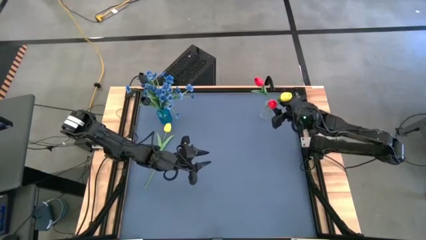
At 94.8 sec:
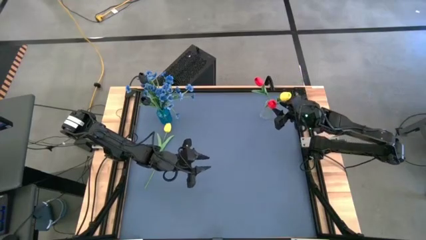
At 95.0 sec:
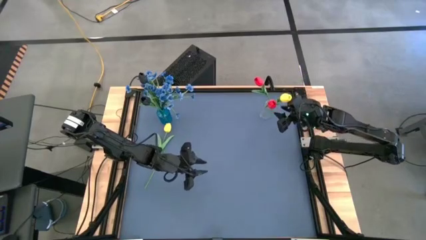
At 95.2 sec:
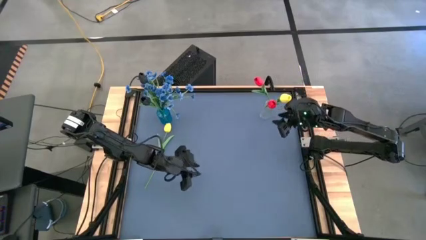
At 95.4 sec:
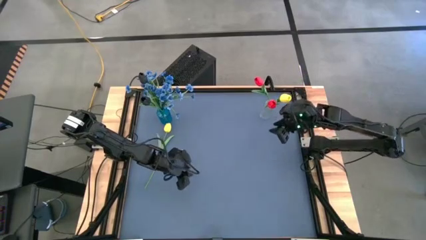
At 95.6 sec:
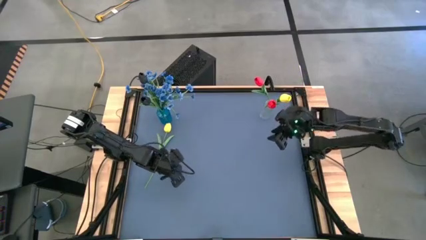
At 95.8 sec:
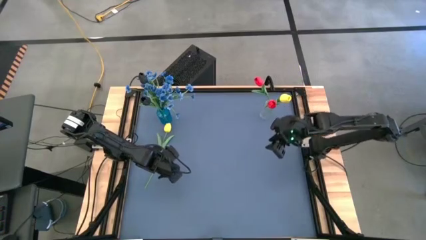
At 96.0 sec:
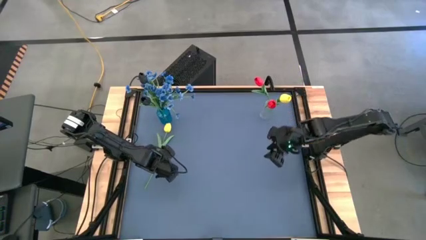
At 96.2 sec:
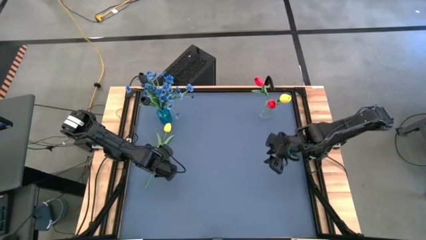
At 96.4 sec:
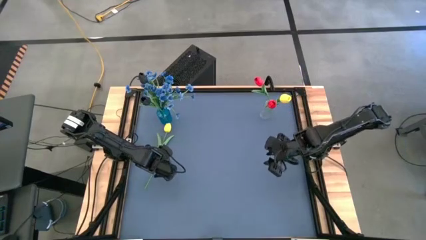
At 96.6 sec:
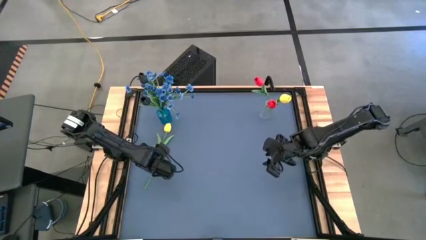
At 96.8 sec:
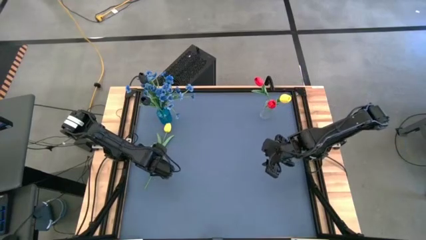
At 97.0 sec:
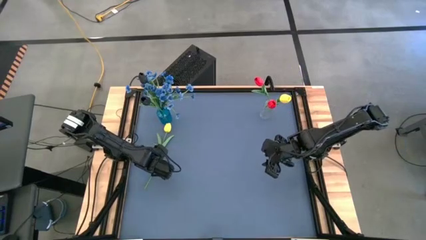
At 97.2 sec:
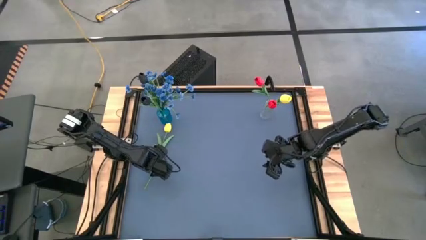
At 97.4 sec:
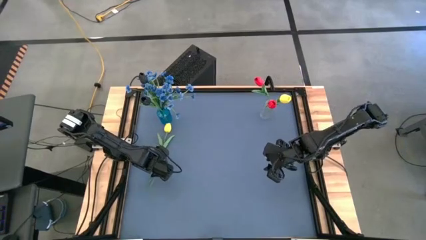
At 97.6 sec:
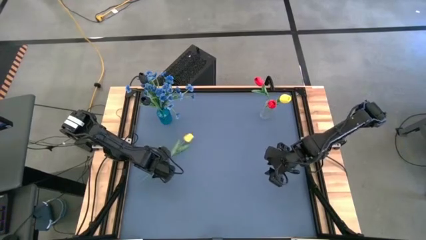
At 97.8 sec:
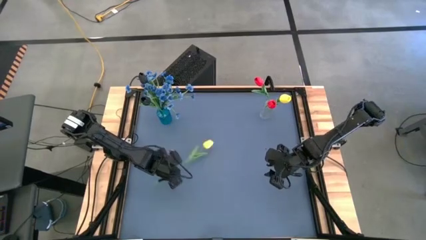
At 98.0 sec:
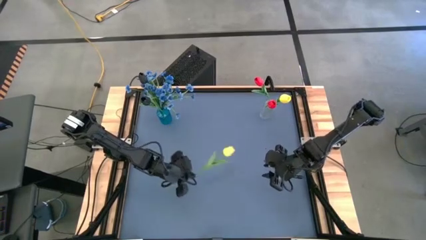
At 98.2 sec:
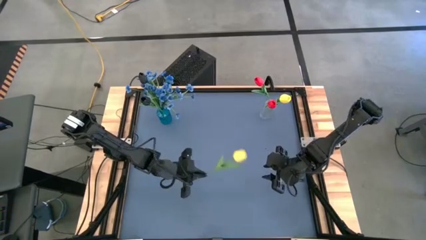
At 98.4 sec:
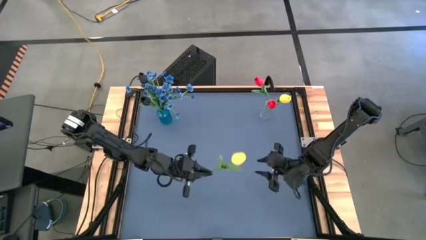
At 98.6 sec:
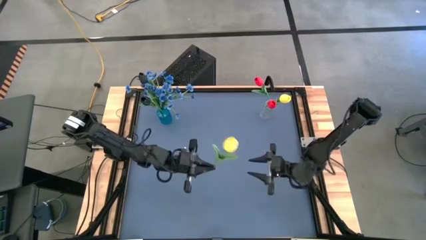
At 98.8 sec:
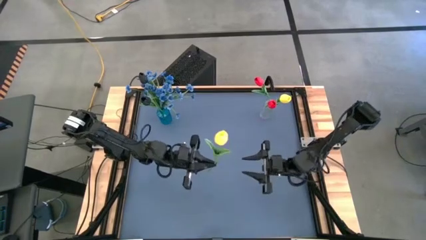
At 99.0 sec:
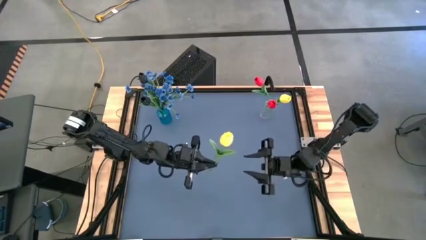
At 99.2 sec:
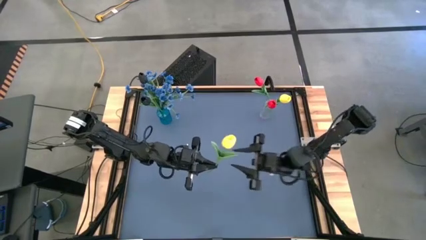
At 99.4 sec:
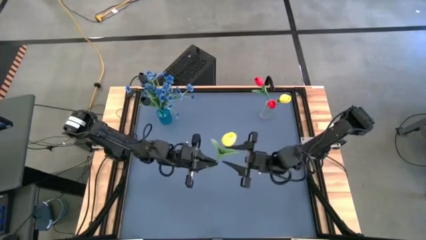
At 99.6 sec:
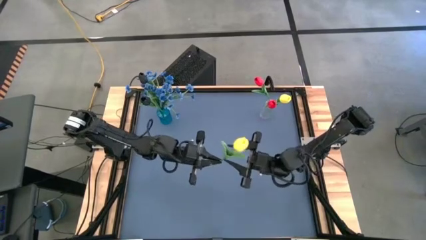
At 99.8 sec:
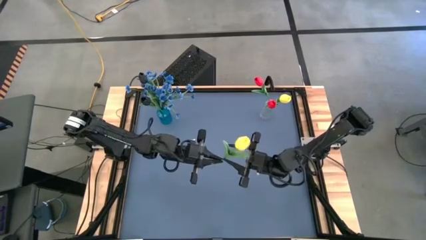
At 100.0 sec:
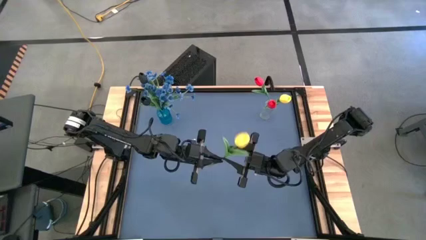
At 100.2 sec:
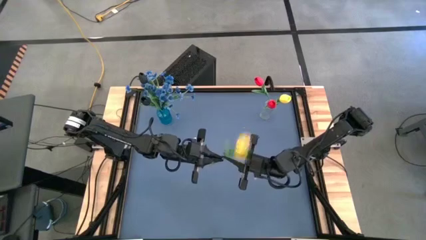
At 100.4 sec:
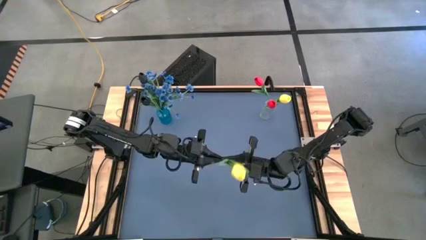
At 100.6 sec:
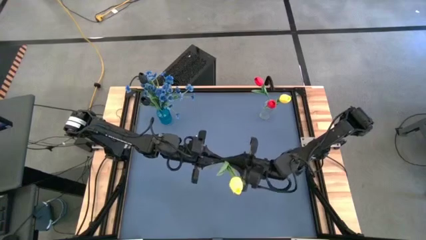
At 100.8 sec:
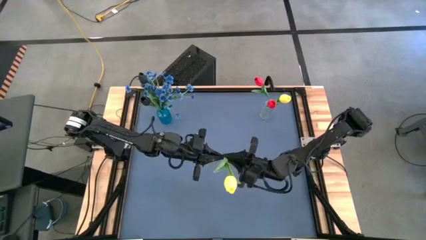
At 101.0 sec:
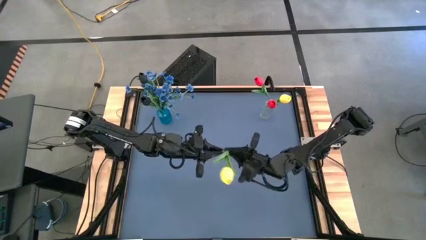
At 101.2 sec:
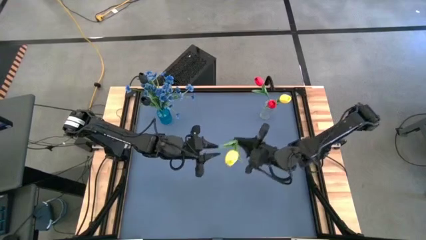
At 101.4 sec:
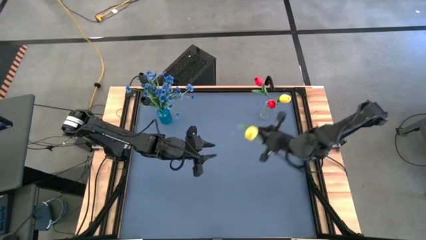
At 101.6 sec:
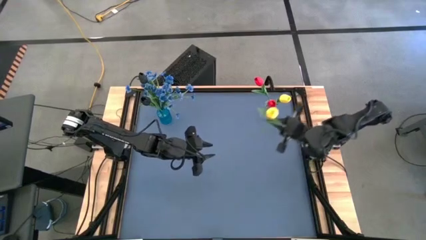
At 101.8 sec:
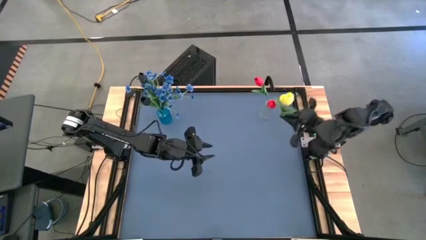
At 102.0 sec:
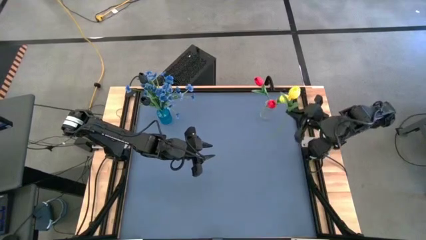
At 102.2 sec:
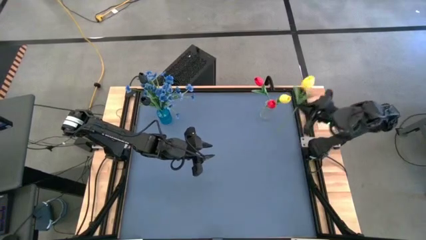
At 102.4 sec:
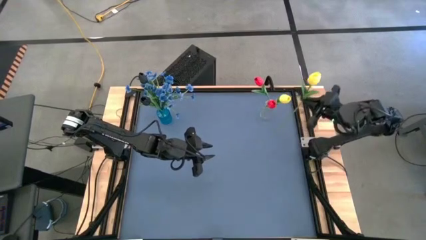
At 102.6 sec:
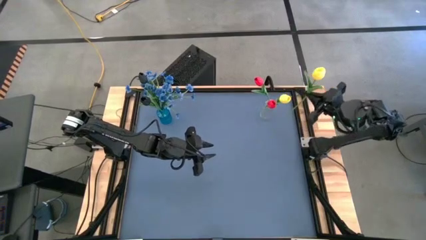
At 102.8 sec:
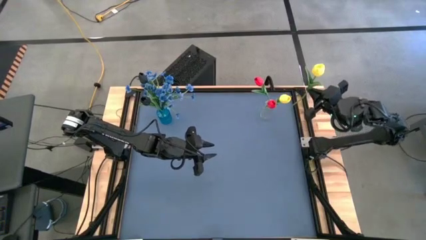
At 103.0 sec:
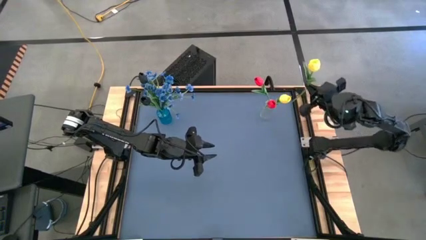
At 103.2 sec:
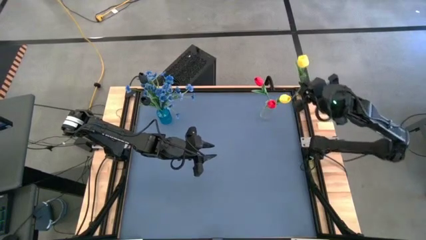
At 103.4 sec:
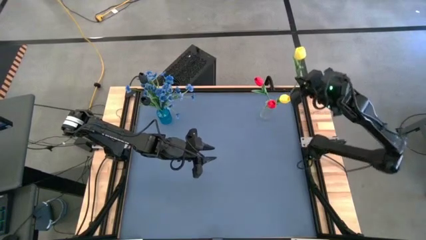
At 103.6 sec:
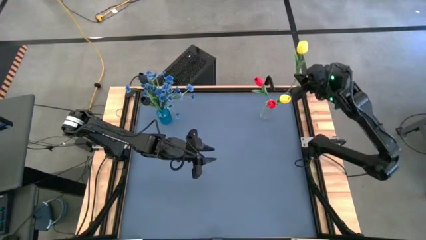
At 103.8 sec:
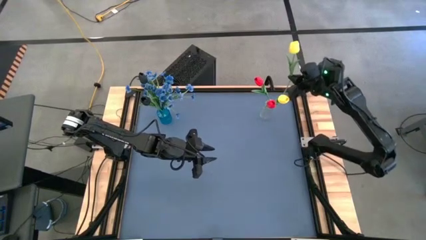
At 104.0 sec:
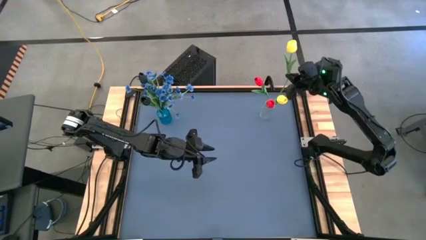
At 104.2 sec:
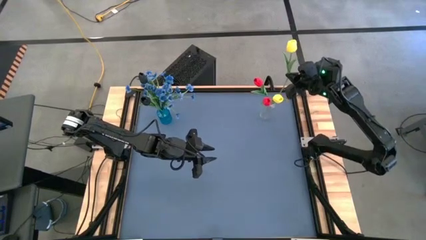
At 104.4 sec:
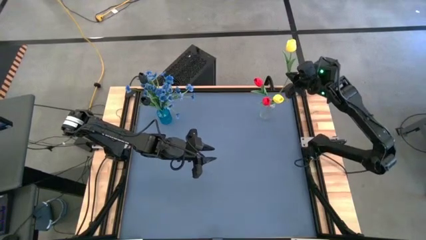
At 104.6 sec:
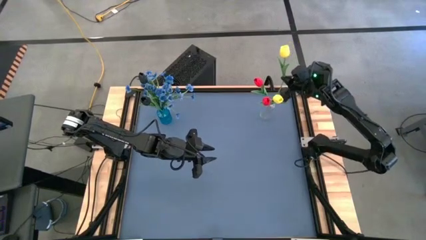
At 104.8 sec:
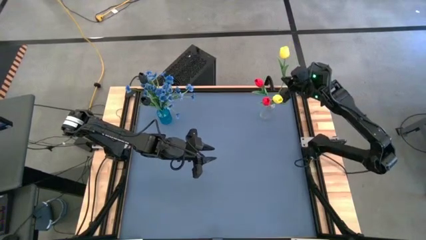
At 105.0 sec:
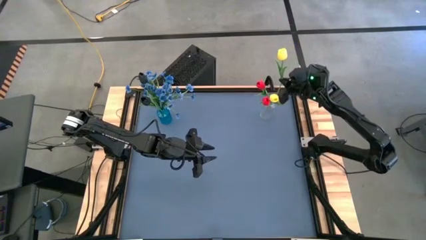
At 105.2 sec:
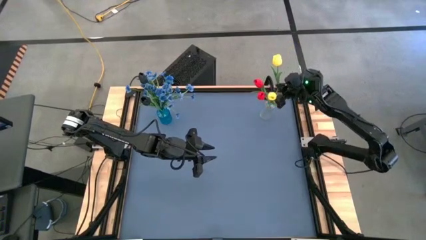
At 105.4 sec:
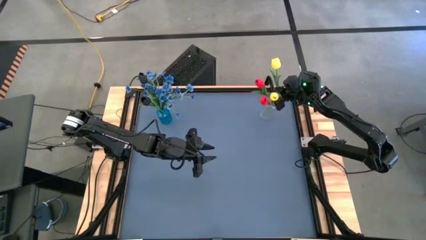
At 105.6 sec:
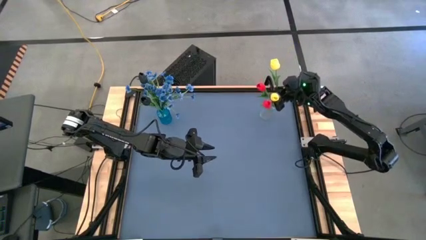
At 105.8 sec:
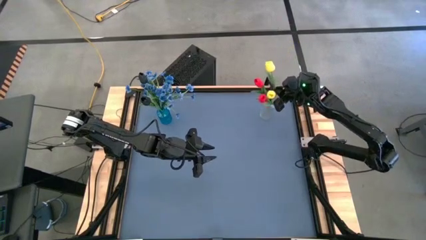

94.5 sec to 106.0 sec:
Task: Sort flowers into vase by color
Put the yellow tulip into the transparent vase

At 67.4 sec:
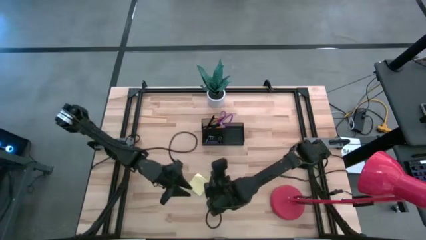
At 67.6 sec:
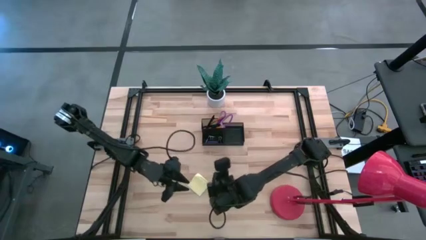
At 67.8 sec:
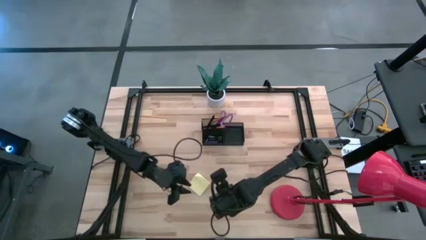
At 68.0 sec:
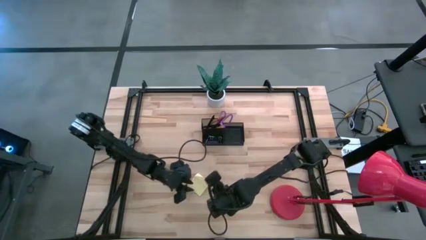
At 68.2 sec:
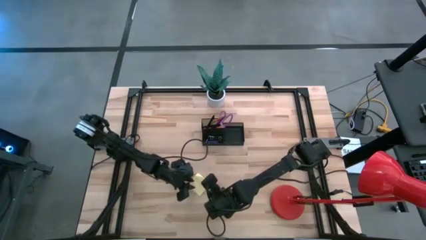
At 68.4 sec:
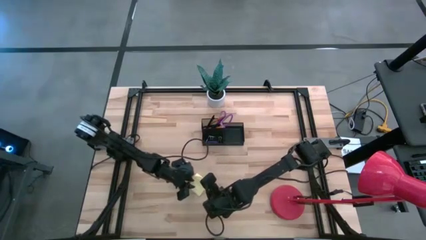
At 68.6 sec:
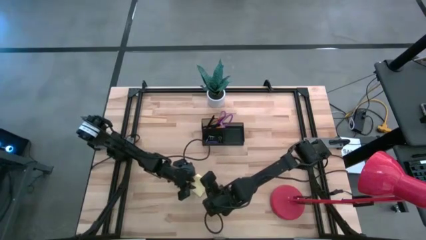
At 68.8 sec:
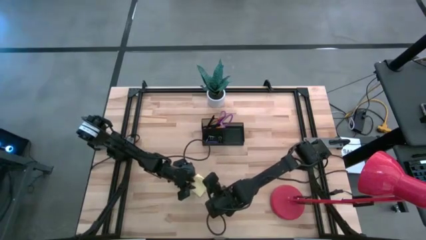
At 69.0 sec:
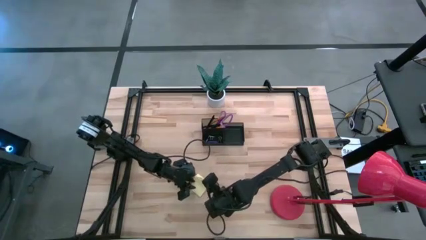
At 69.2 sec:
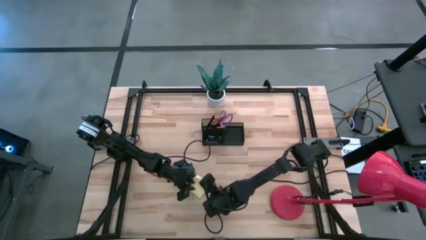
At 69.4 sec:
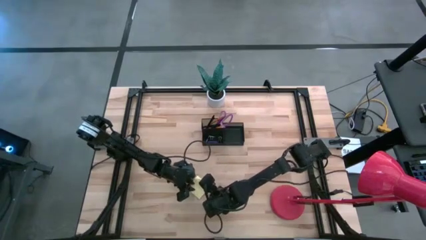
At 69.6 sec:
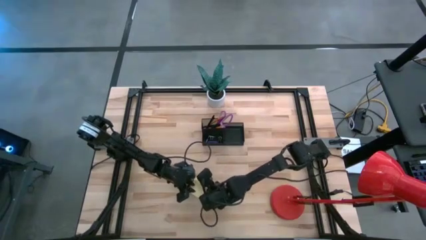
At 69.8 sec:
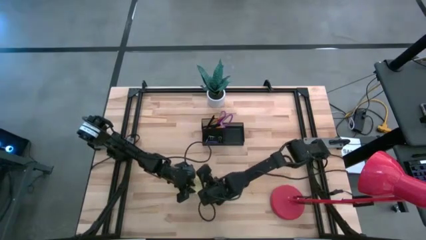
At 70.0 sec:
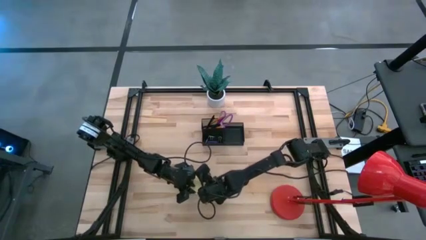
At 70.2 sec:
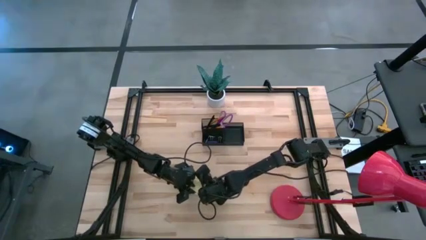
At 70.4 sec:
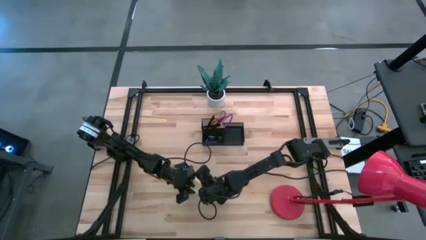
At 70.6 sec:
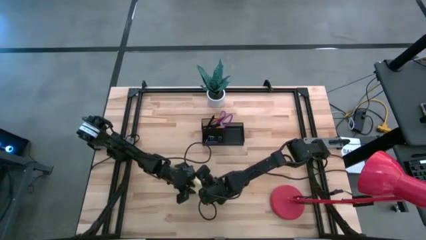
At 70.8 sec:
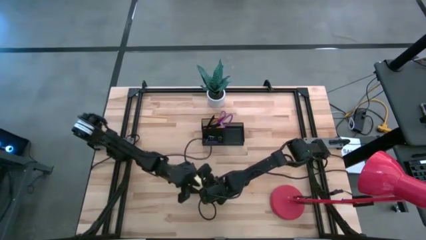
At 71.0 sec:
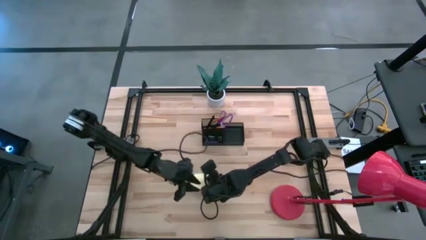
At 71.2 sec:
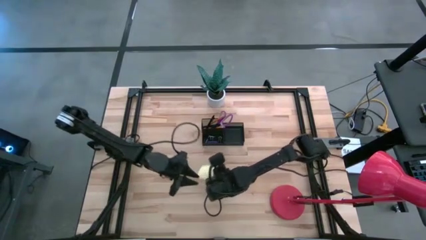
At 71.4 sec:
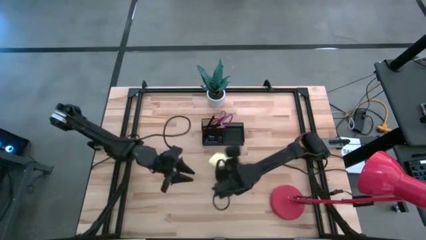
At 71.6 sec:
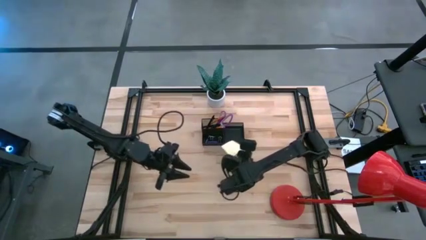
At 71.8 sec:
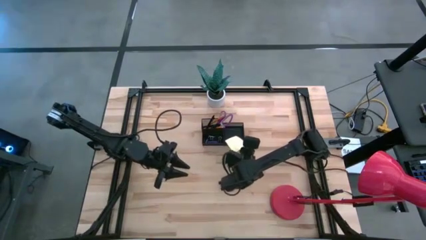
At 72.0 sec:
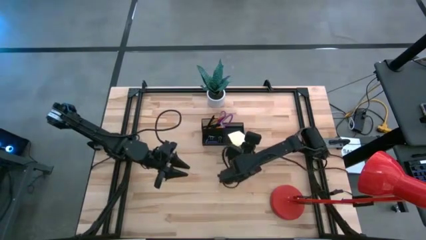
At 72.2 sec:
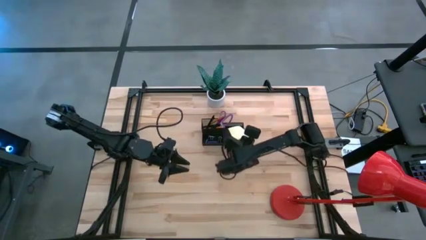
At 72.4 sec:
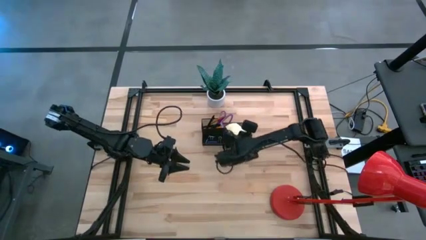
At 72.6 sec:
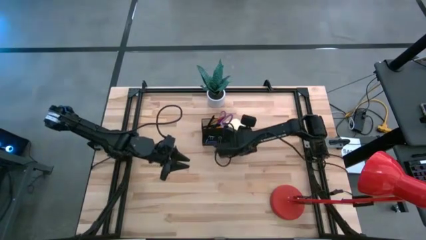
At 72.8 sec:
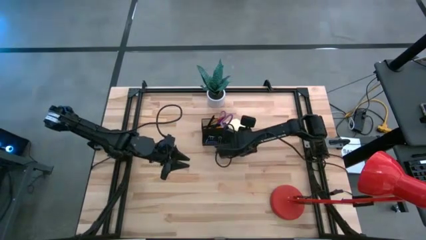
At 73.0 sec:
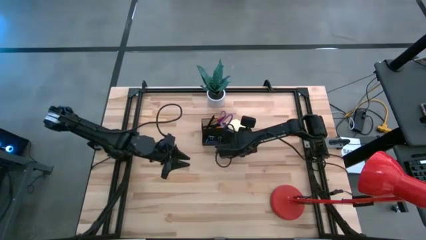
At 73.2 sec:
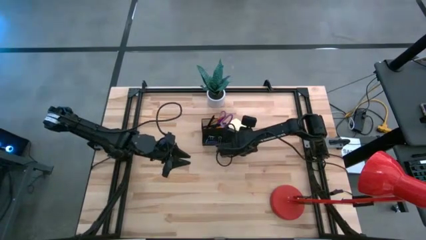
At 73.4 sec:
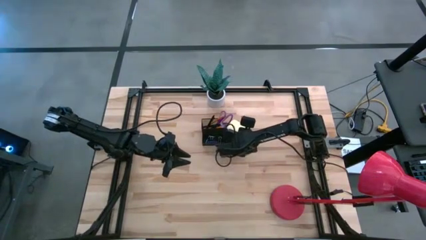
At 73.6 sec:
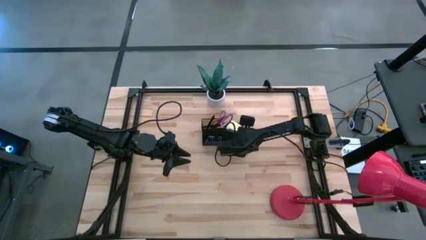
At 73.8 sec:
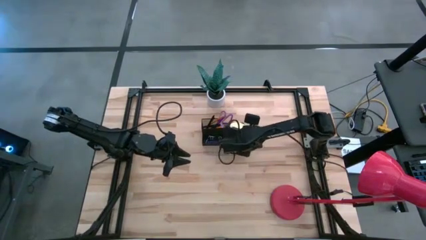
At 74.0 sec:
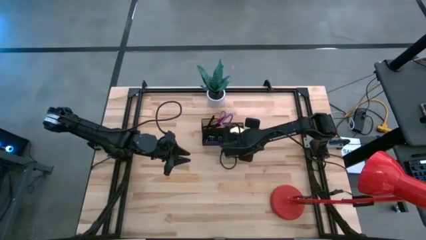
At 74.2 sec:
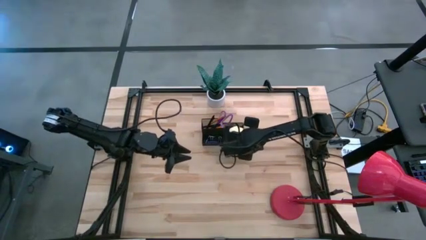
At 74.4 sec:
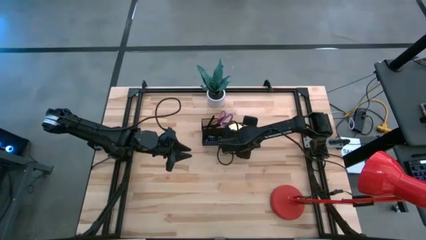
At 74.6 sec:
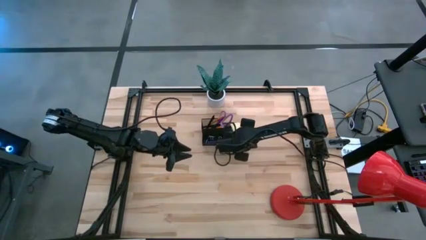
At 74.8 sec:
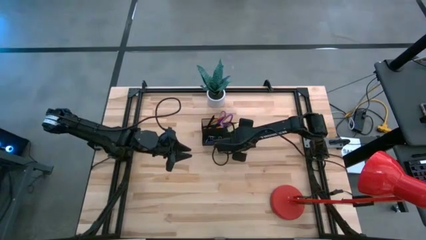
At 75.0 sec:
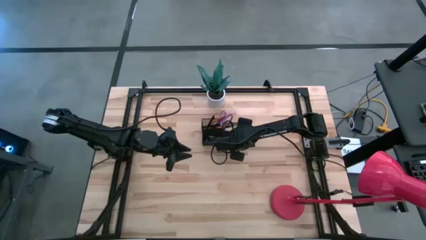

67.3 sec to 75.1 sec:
Task: Pick and place office supplies into organizer
Put the yellow note into the black organizer
